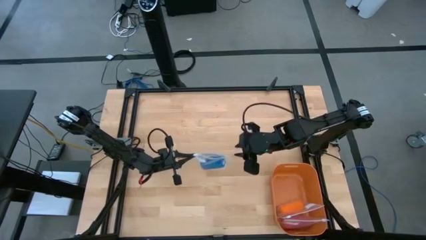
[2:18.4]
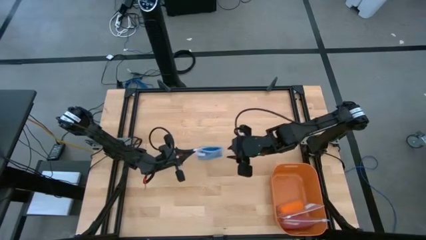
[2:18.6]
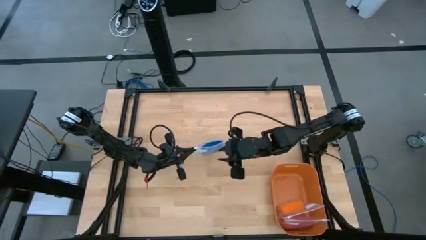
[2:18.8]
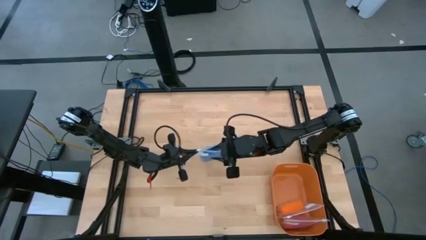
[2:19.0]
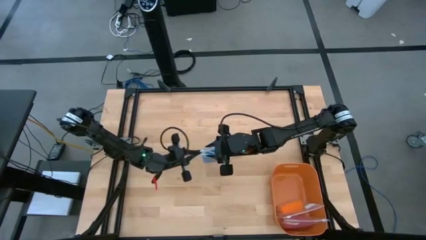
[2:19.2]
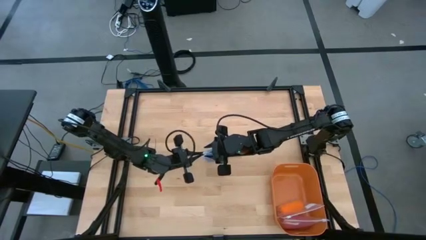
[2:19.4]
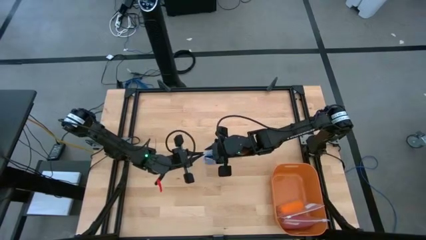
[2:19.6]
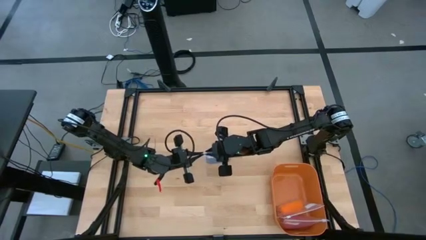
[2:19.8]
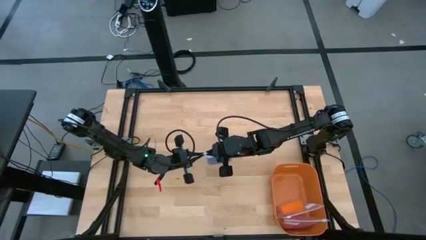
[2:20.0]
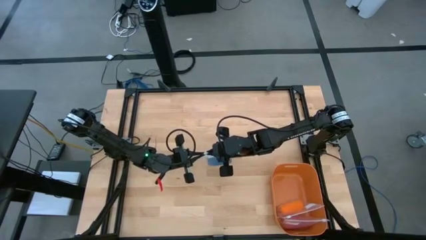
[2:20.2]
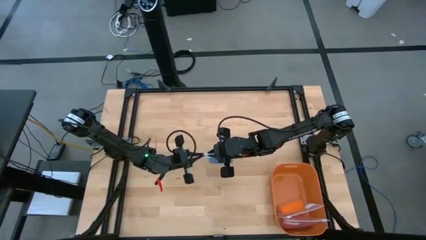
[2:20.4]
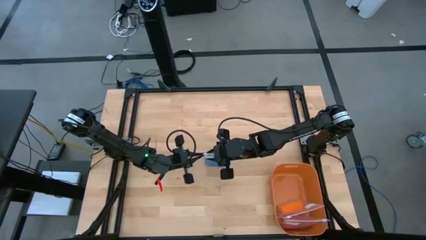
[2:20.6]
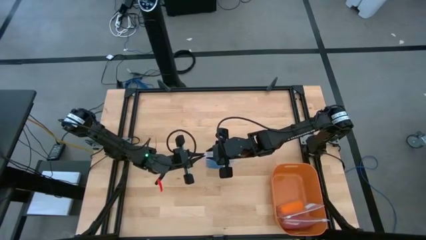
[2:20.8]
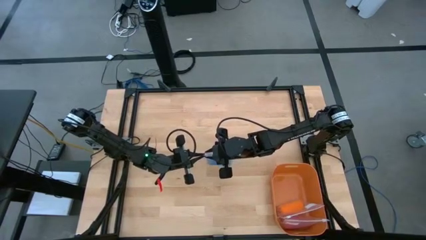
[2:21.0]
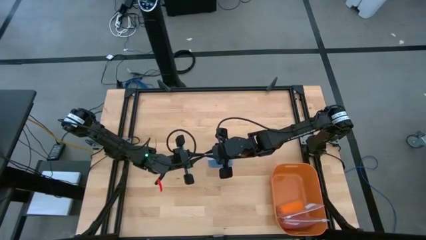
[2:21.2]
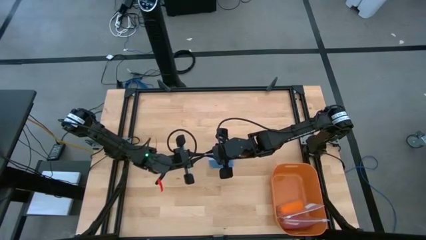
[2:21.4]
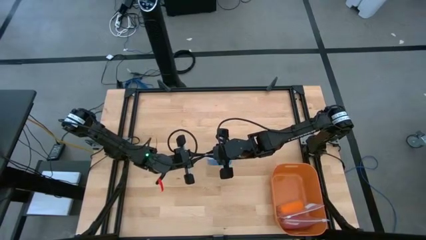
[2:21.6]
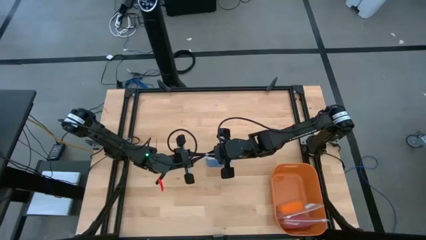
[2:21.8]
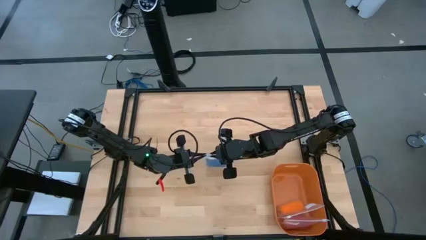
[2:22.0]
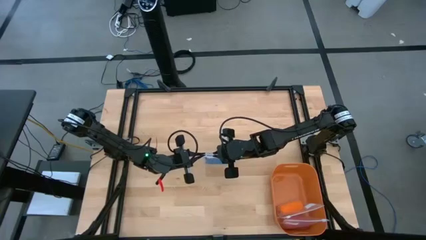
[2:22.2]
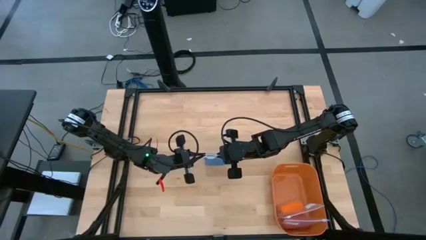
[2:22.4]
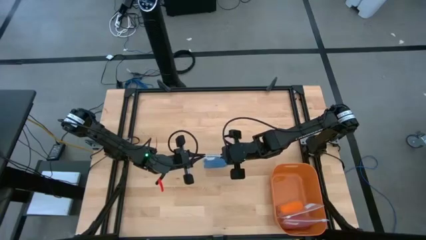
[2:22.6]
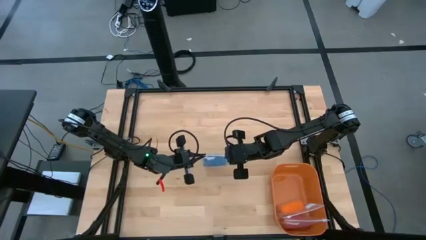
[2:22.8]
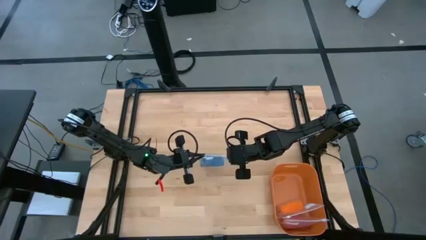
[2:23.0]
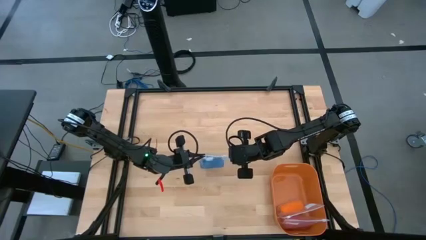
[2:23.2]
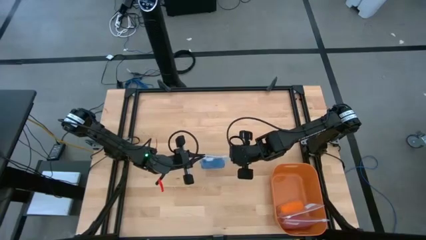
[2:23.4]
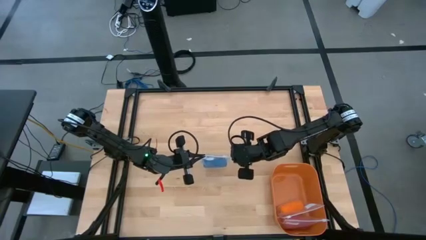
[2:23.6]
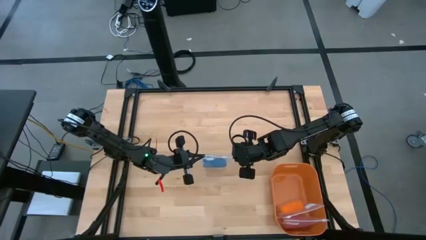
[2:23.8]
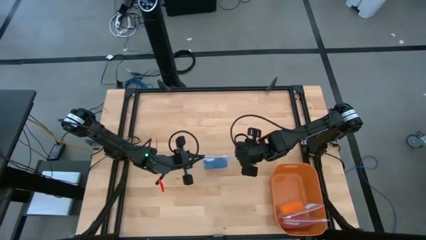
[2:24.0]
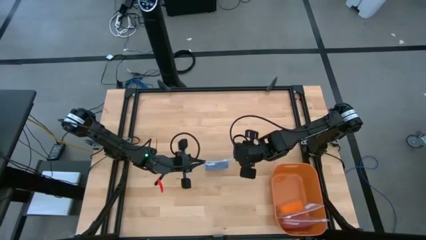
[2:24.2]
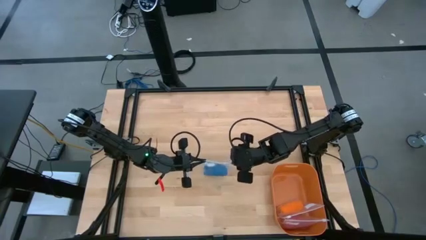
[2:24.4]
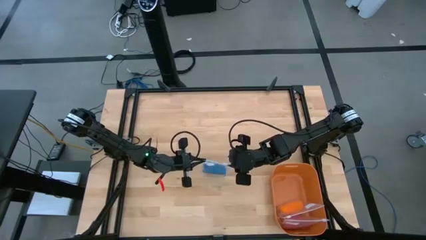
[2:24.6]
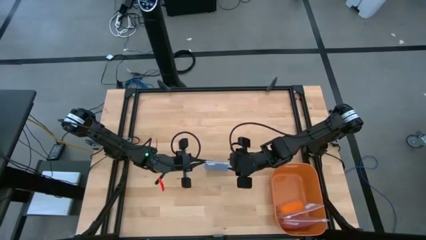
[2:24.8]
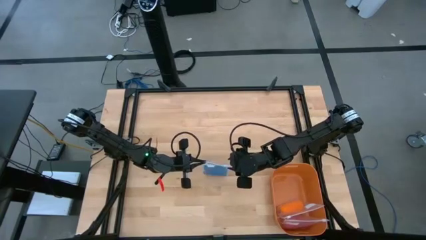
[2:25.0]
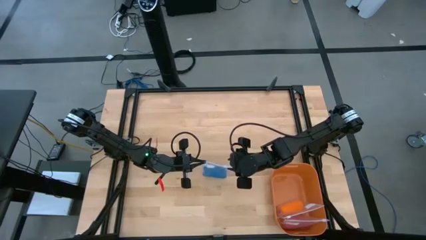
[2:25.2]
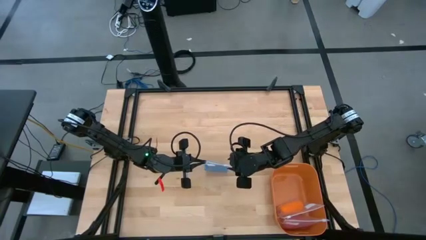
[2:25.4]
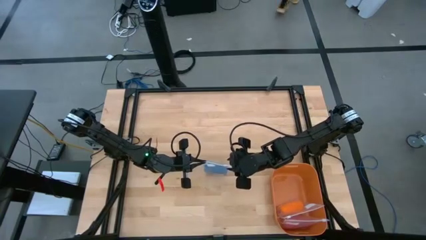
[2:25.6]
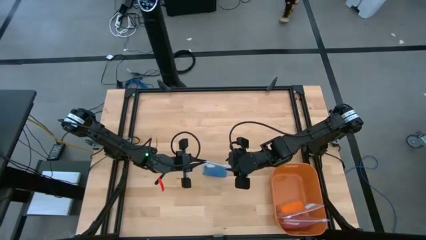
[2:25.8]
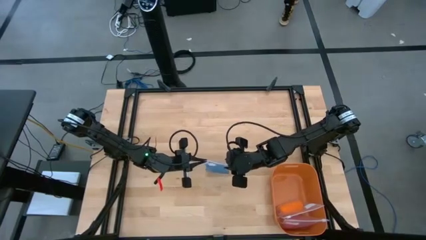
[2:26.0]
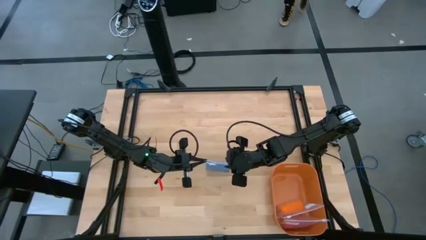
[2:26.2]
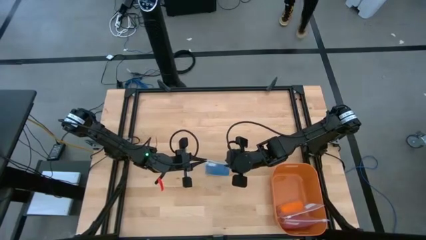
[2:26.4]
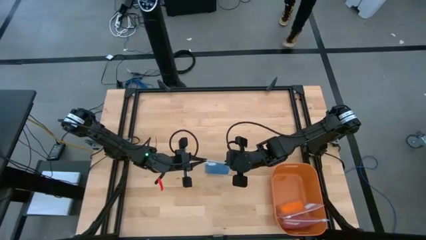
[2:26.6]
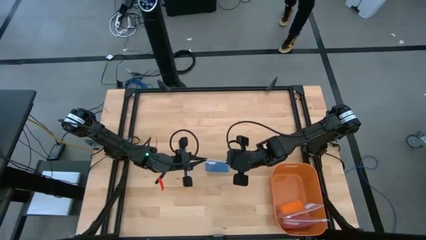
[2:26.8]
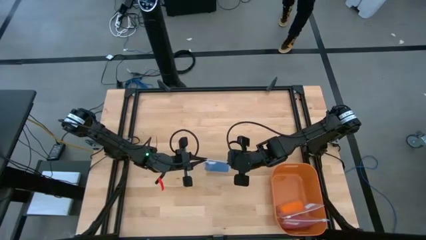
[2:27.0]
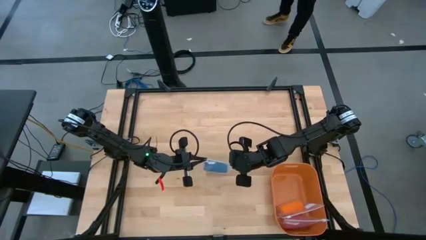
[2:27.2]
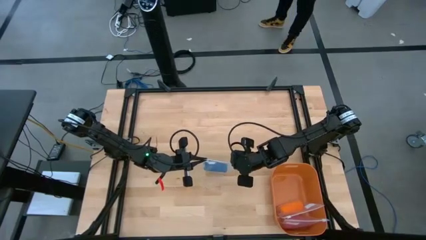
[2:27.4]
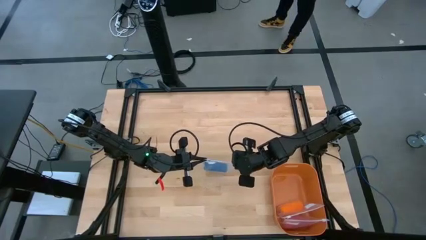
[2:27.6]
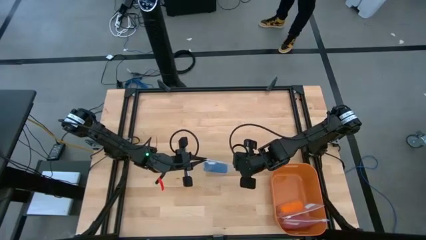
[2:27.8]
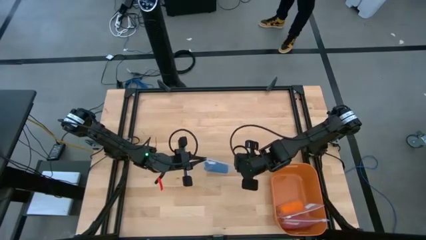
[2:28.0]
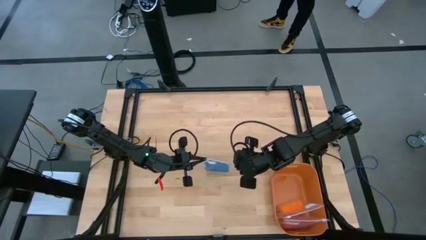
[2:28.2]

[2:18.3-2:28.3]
Task: Roll bandage
Close the transparent zip lock bag

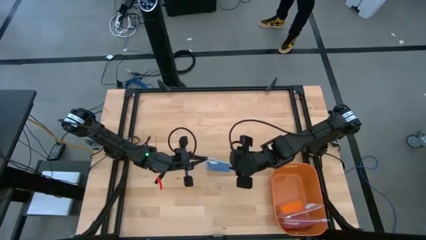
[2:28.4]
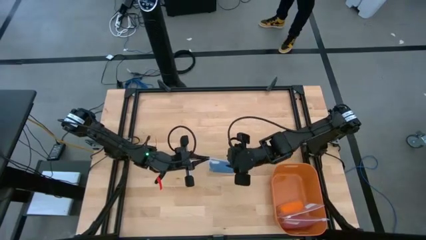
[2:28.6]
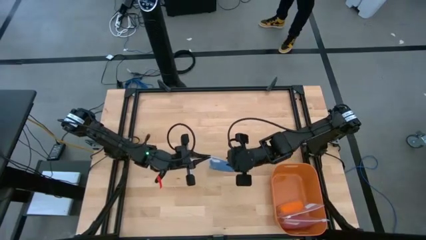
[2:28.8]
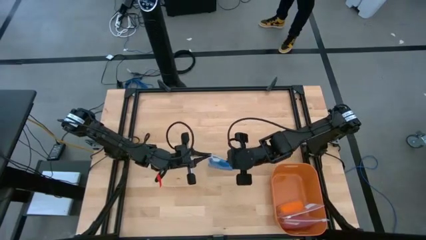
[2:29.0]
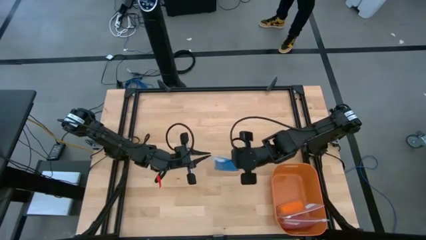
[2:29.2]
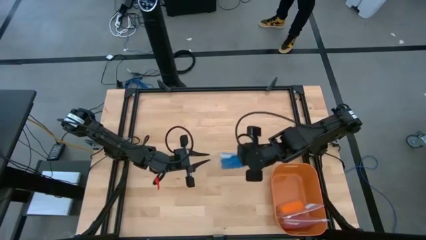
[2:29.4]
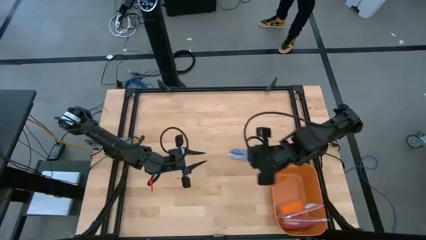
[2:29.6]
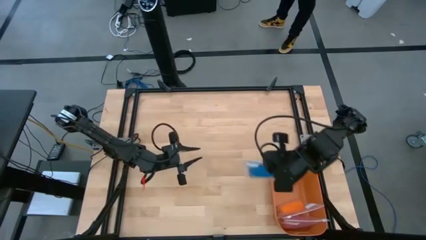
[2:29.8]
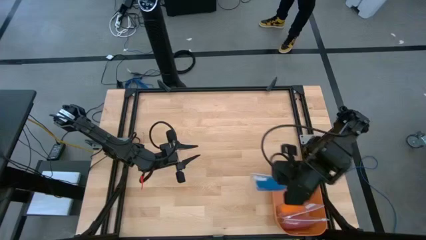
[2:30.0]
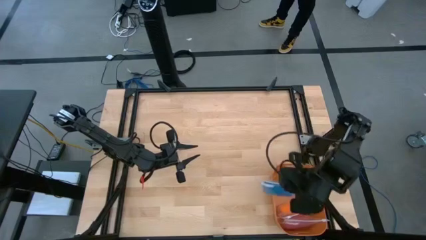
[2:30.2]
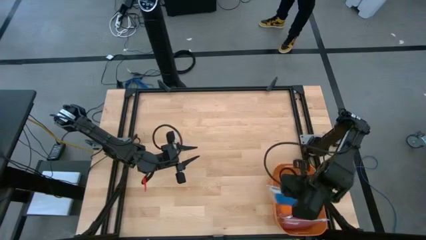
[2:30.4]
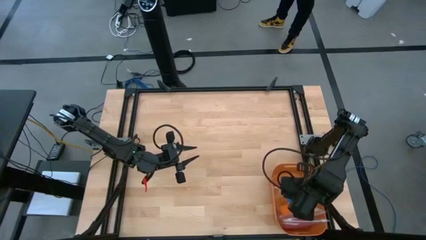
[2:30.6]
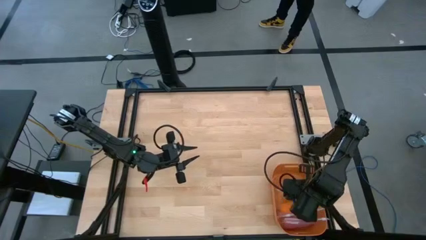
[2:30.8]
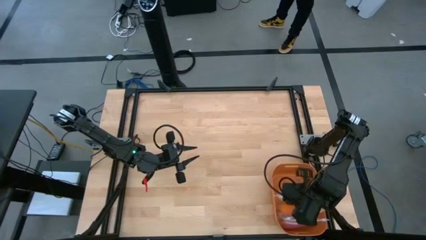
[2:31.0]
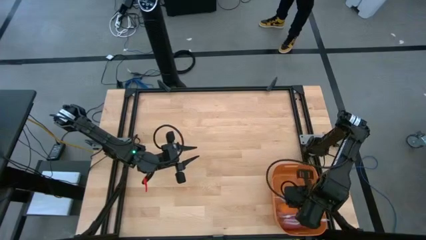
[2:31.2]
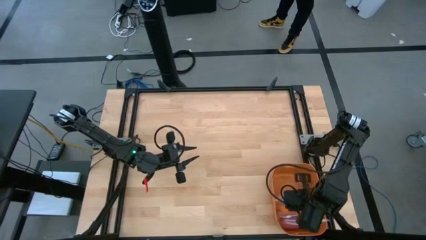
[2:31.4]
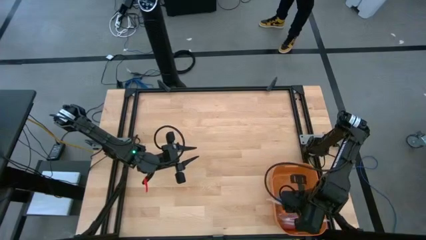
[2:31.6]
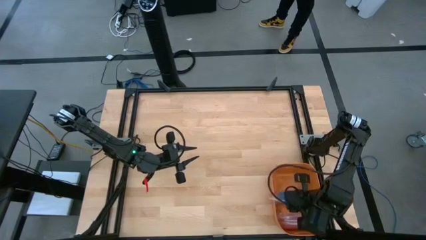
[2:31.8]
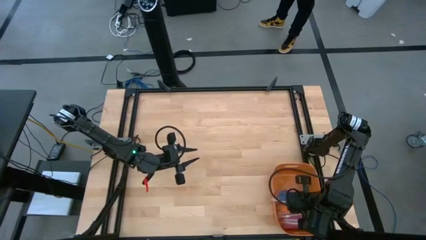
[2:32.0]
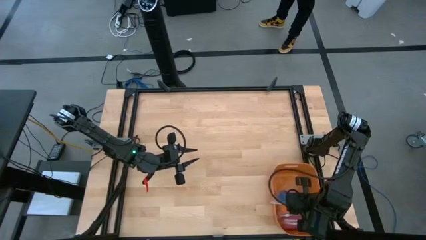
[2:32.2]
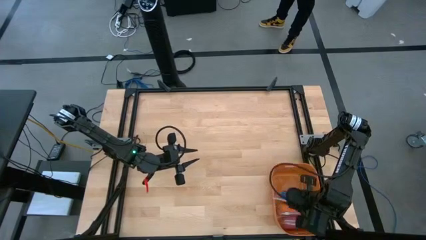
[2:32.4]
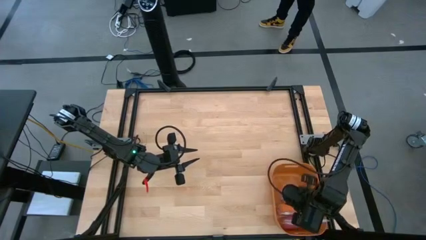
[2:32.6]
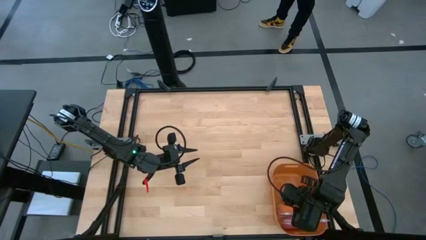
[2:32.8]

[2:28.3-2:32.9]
Put the transparent zip lock bag into the orange bin

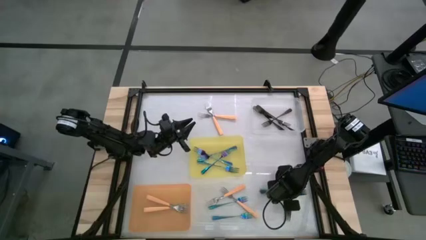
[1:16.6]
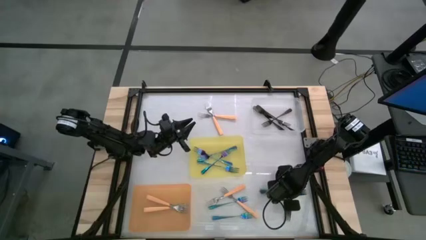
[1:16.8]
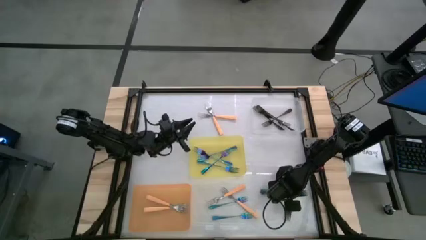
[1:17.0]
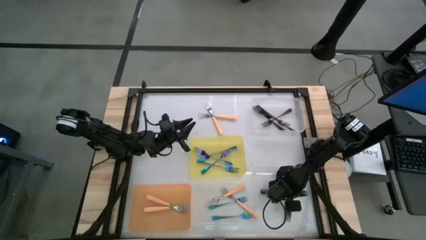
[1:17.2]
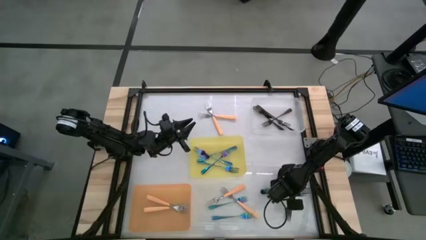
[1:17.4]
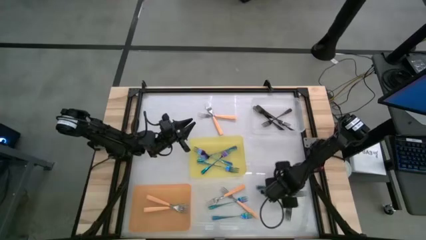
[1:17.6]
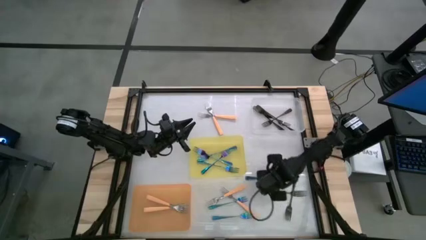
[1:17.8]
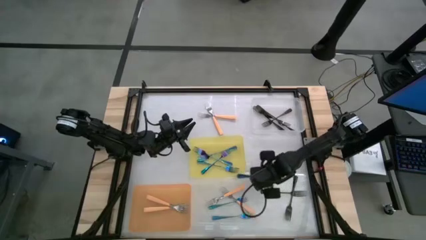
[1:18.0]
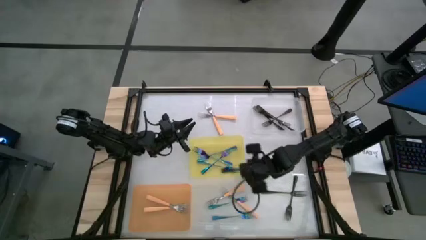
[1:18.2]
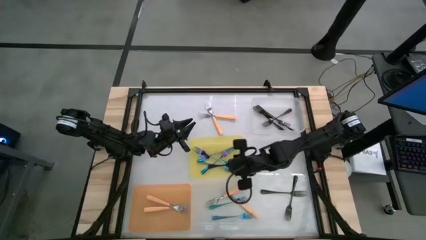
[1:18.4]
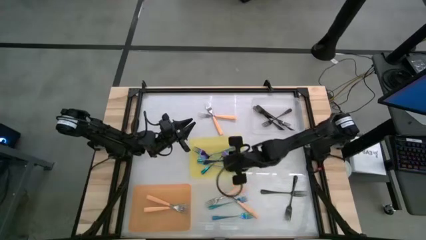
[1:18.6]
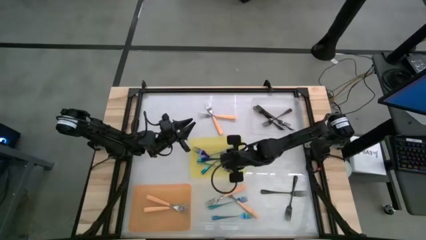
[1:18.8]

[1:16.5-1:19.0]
Task: Sort silverware by color (type)
Put the blue fork into the yellow bin
